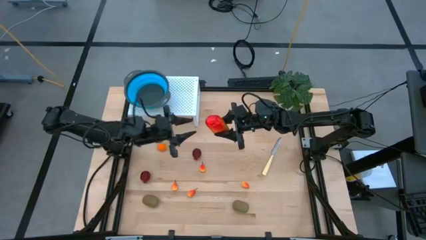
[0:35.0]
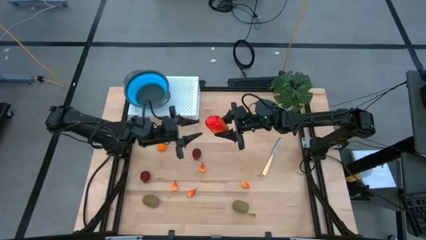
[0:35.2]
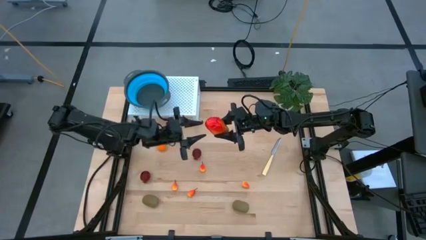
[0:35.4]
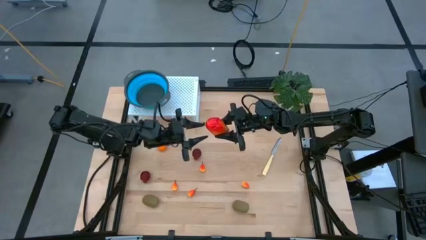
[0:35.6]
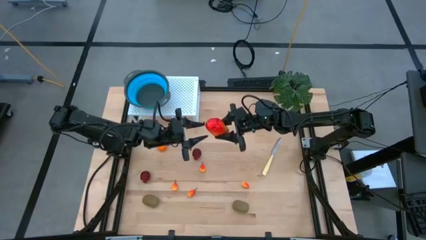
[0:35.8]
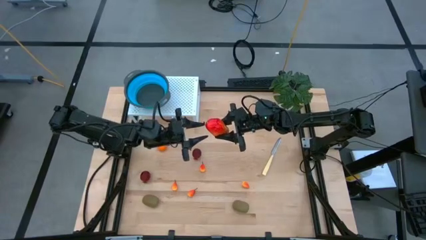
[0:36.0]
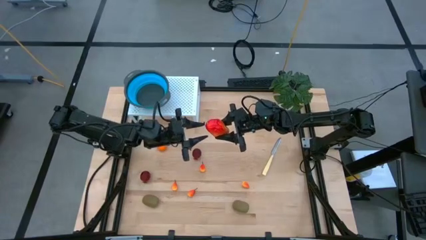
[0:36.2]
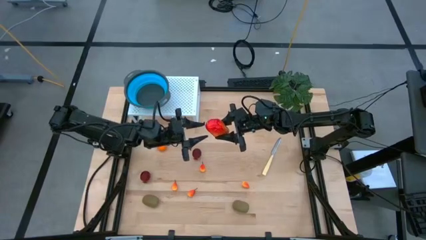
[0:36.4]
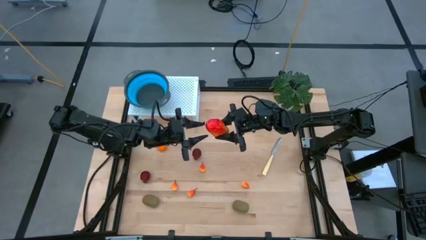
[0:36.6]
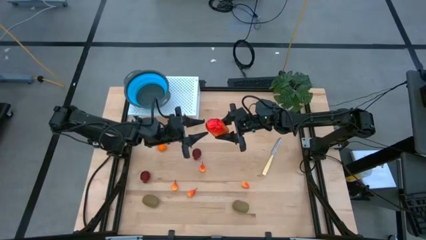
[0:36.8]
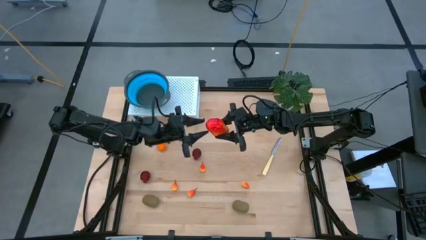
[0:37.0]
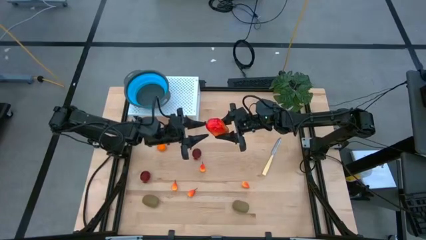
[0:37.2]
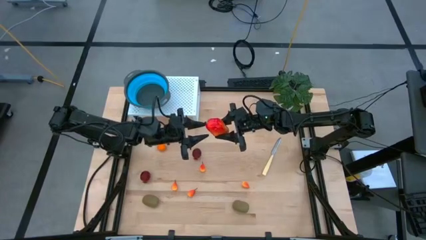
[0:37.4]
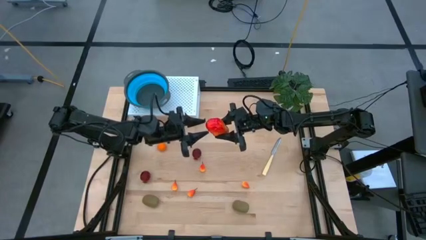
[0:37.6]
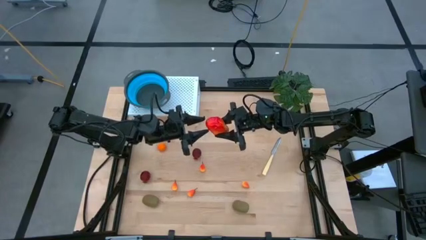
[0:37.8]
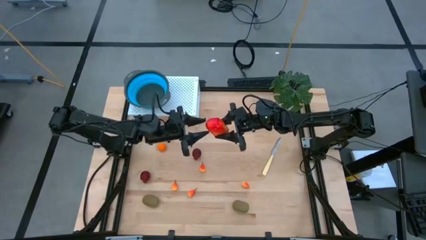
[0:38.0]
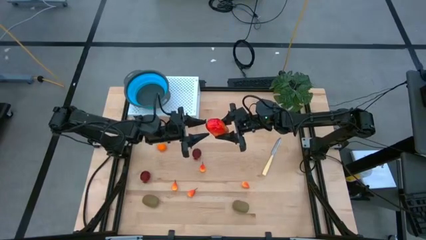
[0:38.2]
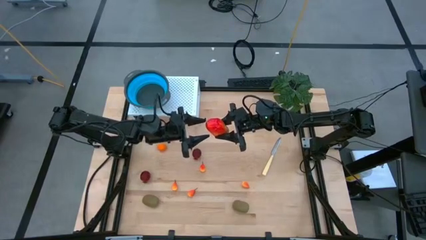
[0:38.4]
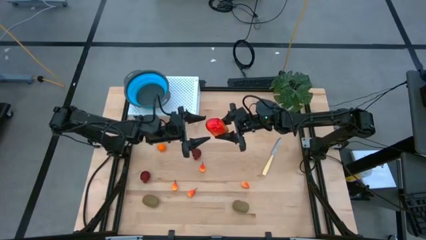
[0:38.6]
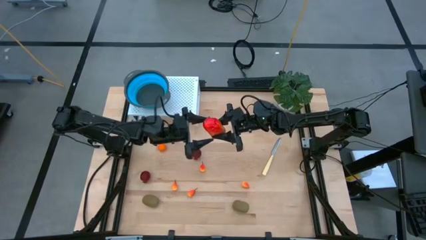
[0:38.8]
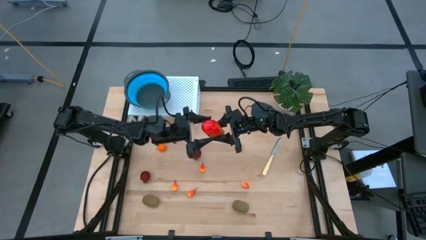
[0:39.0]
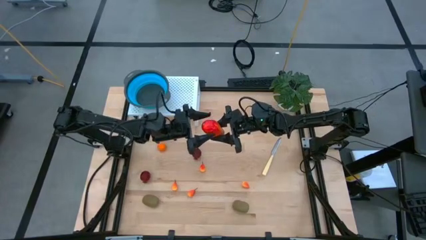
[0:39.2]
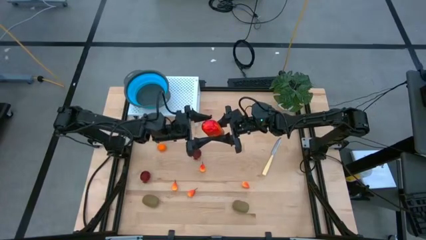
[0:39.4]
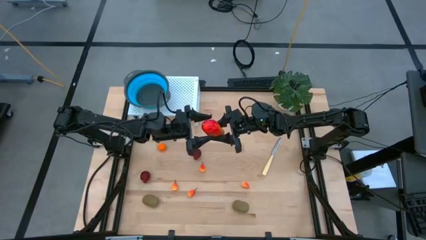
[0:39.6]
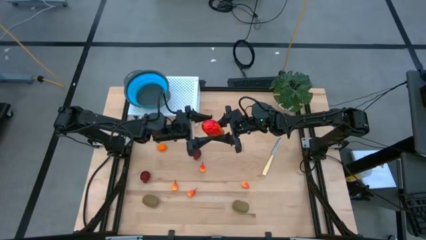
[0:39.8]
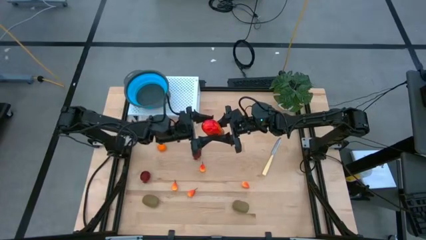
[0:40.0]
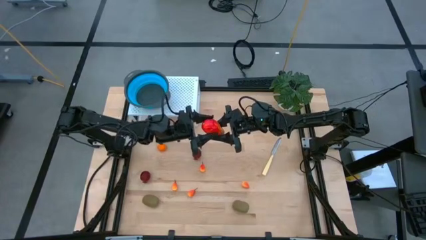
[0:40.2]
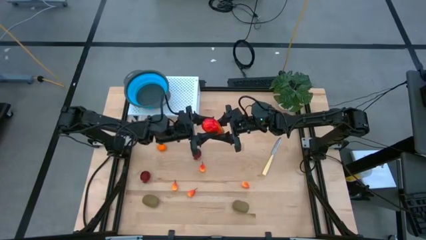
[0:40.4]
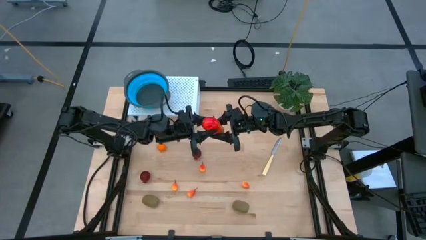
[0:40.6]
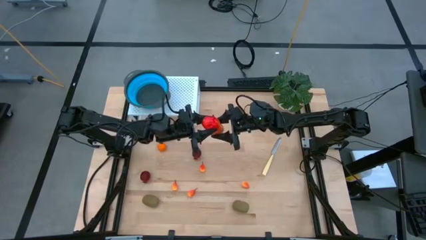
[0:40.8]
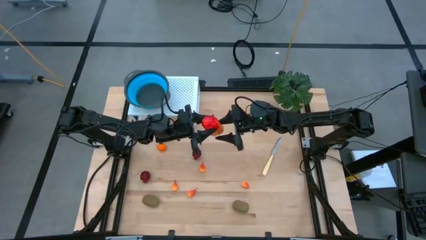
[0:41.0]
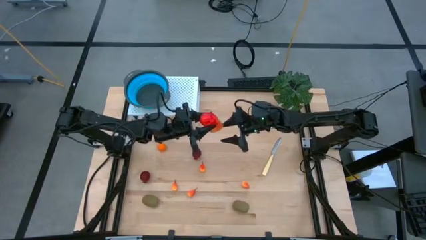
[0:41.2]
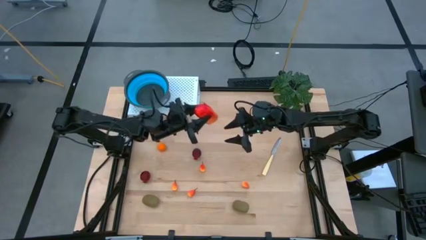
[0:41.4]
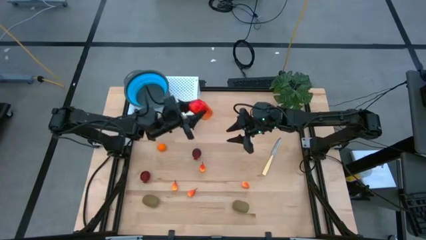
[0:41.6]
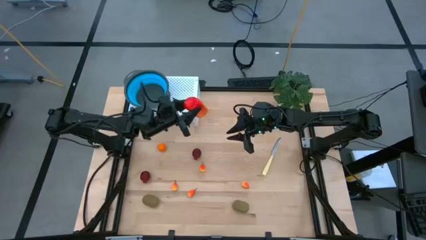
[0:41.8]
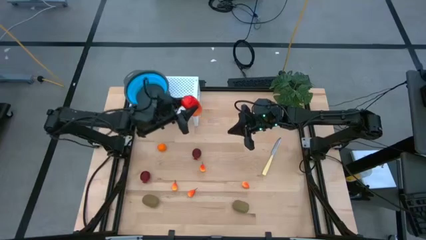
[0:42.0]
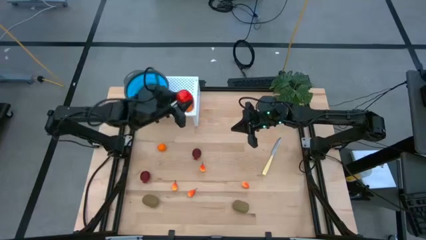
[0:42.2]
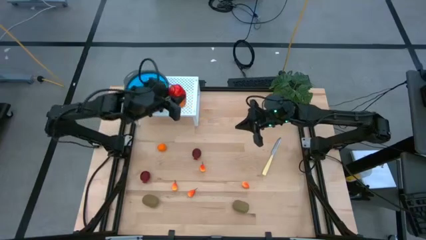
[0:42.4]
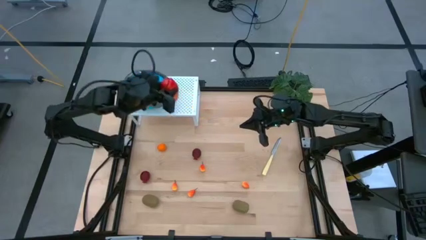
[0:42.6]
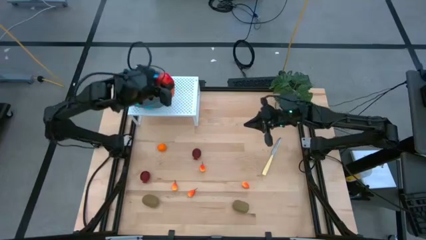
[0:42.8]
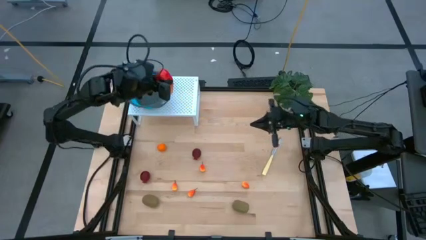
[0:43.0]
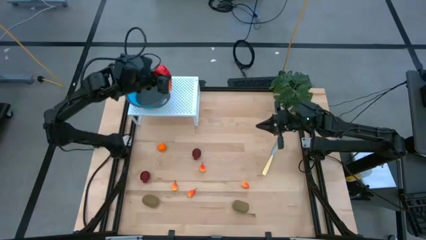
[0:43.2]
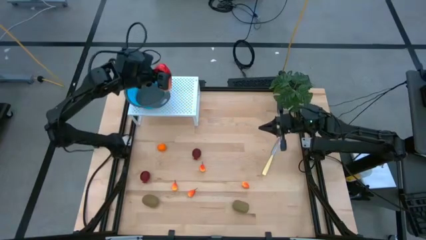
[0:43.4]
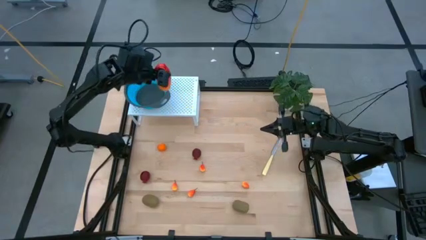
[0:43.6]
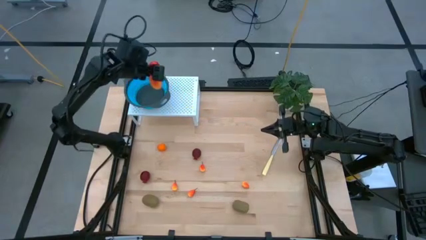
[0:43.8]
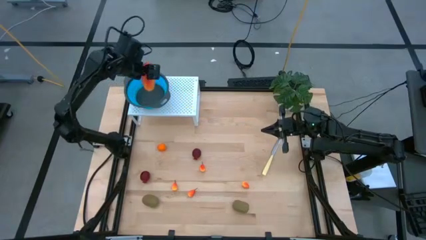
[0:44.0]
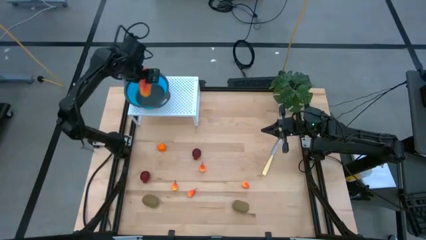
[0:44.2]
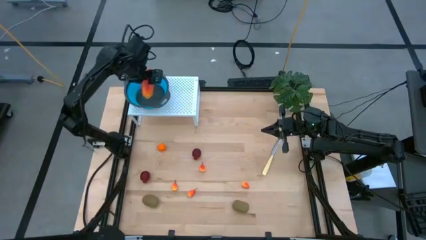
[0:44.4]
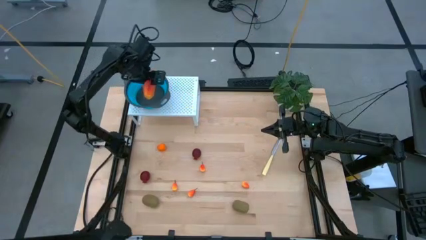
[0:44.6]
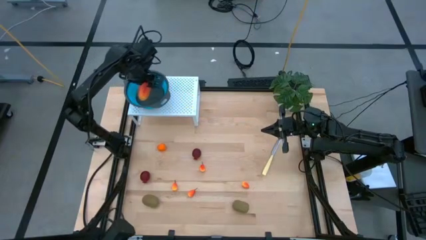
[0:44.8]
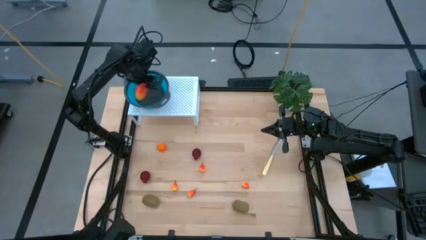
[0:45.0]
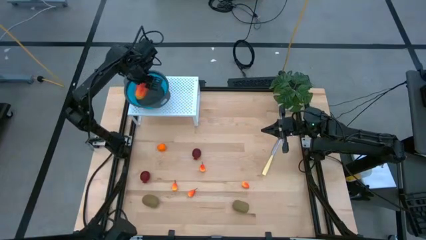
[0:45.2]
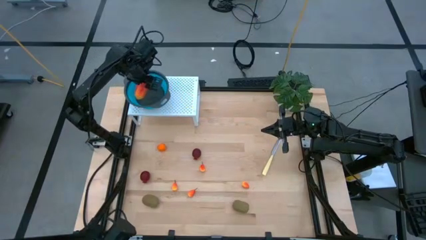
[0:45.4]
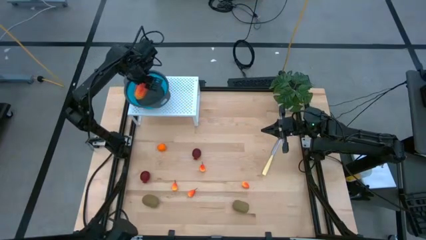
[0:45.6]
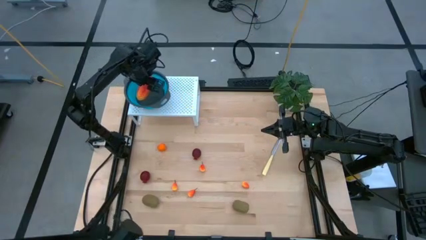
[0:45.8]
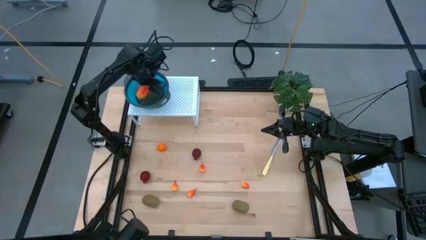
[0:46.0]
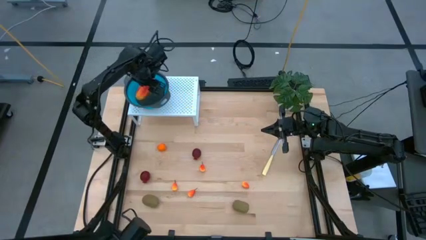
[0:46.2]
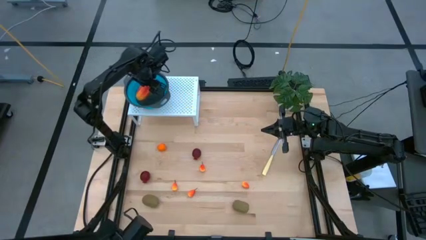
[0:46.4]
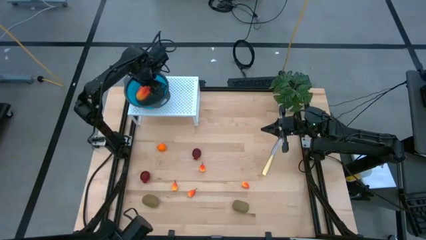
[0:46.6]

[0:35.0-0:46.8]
Task: Pick & Place Fruit
Put the mango into the blue strainer bowl on the shelf

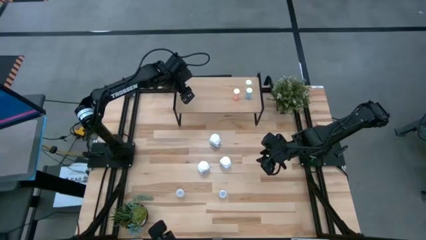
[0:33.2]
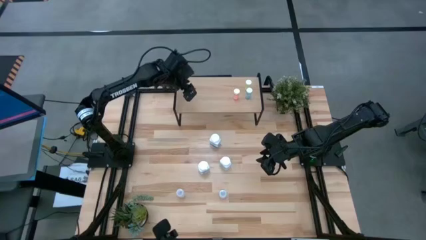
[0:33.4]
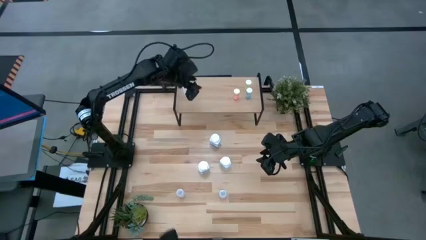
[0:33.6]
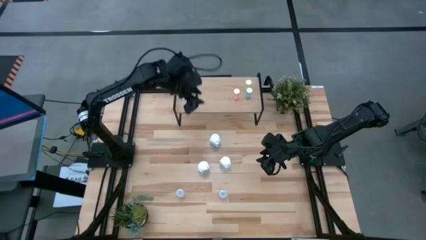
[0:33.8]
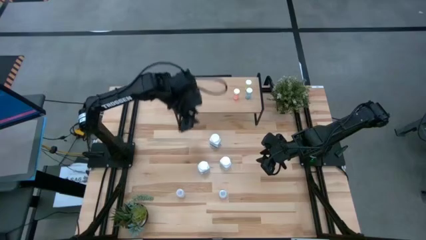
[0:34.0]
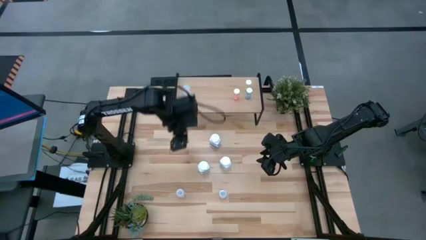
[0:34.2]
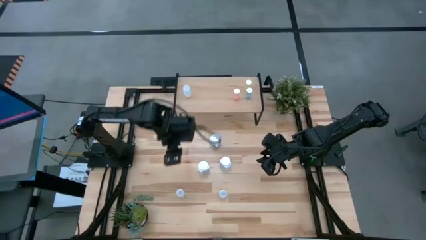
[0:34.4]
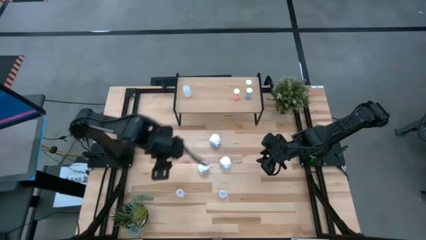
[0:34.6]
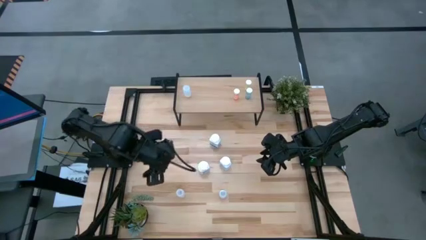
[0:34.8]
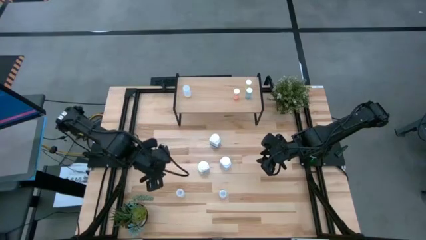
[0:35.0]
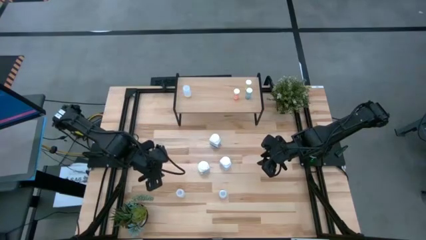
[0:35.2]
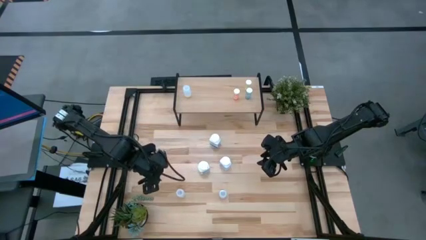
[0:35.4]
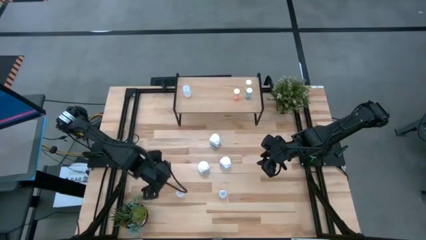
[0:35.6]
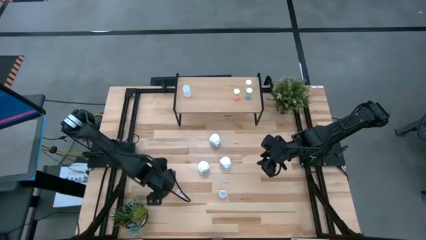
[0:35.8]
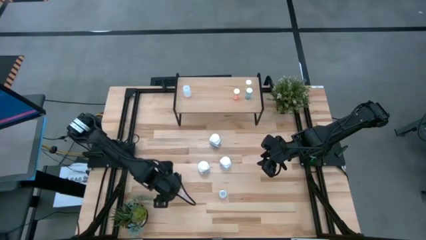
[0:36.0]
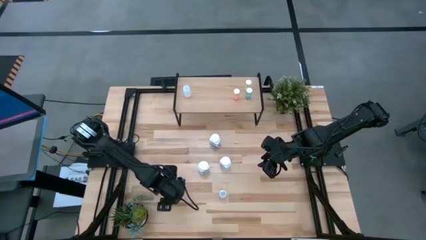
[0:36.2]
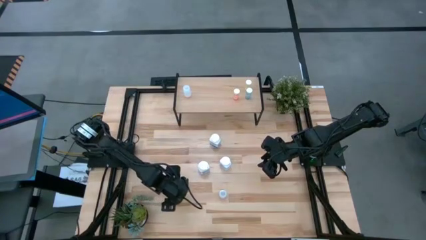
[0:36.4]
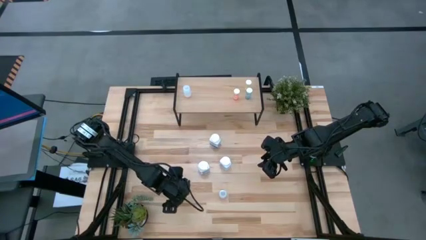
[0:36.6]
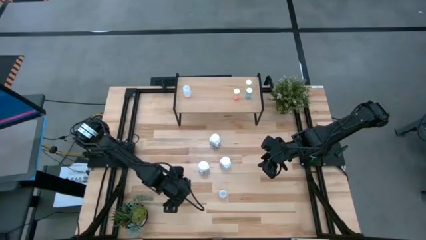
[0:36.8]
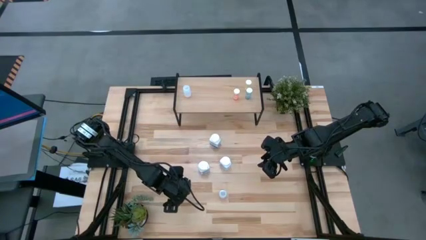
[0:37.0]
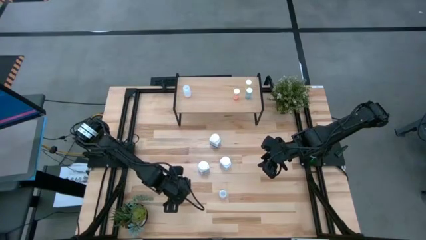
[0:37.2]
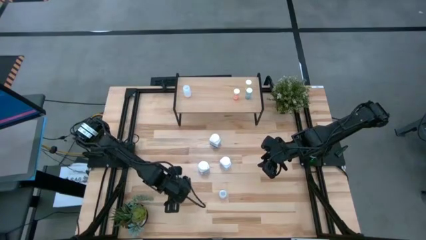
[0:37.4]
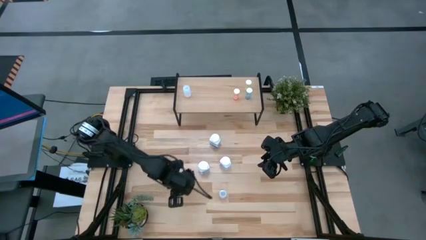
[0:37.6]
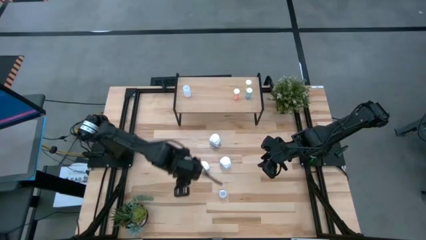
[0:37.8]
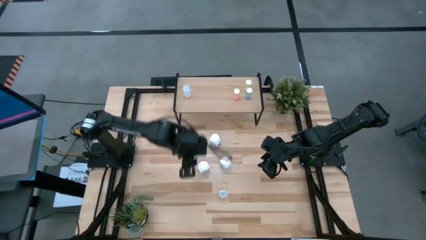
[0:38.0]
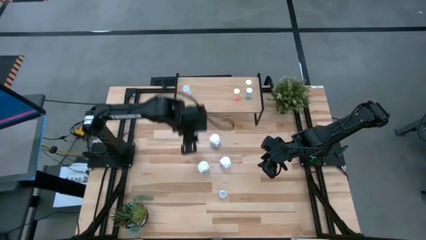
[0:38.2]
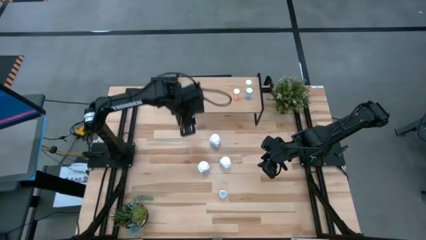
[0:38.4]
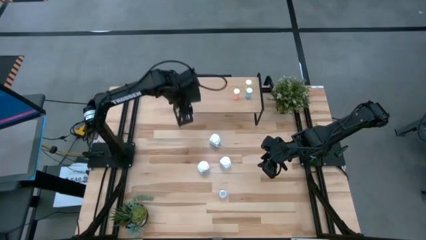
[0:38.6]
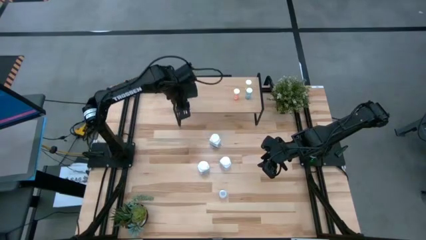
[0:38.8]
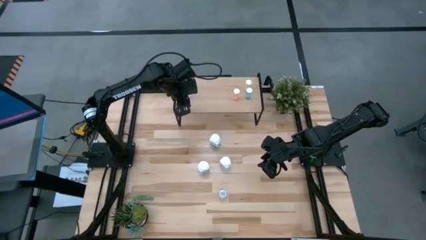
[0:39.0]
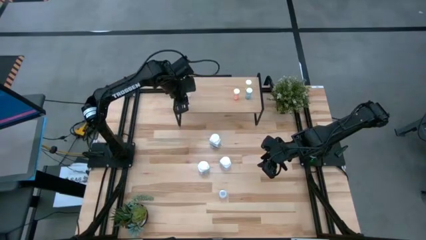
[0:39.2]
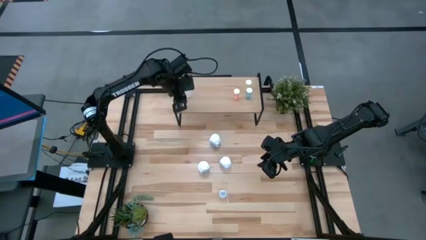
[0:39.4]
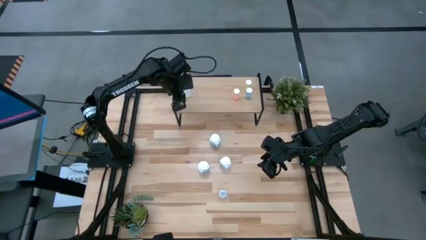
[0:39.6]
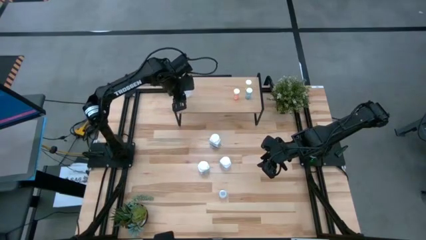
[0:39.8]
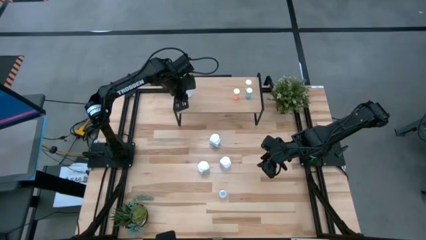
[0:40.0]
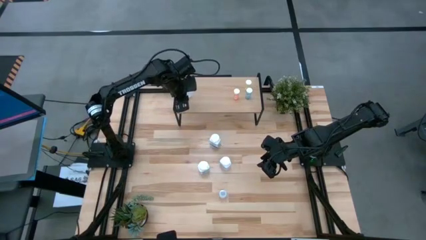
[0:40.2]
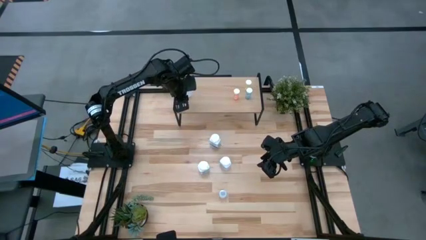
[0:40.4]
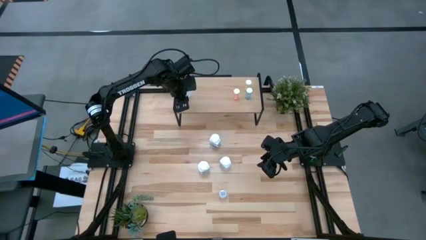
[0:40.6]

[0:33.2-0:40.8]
Task: Pick and place medicine bottles onto shelf by color
Put the left transparent medicine bottle on the shelf aligned with the other transparent medicine bottle
